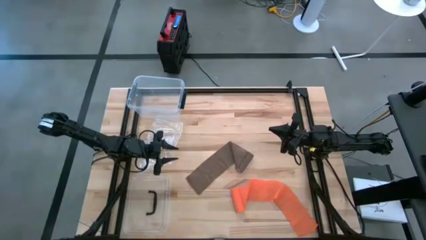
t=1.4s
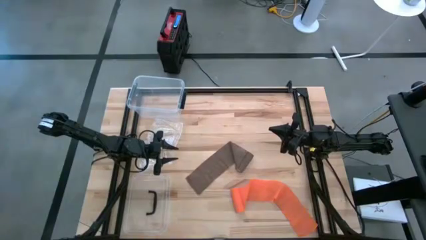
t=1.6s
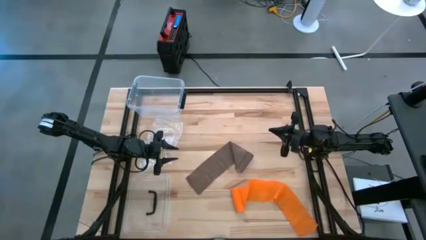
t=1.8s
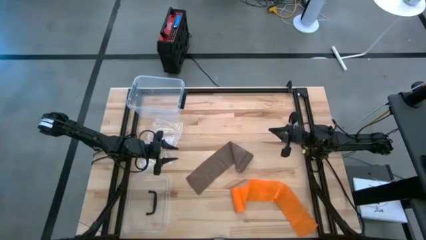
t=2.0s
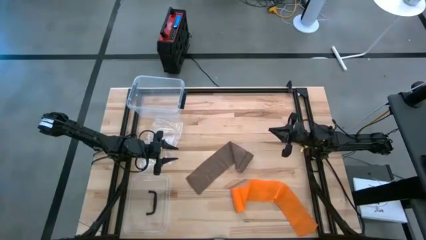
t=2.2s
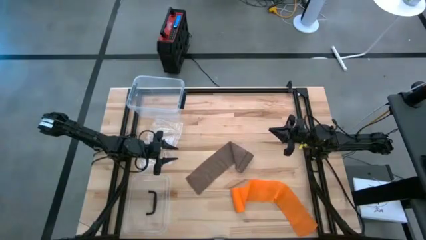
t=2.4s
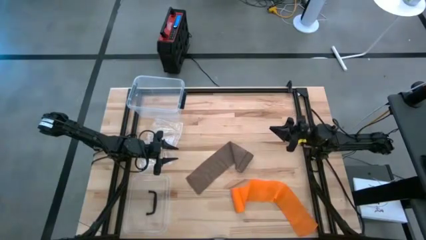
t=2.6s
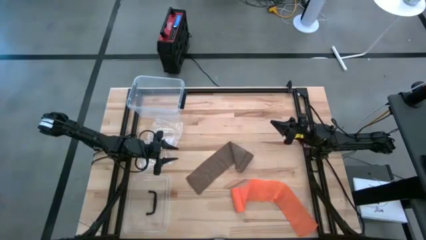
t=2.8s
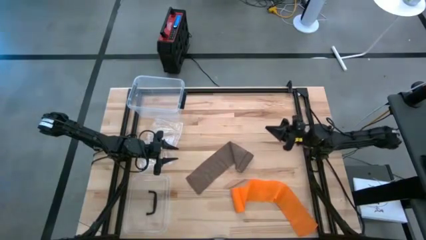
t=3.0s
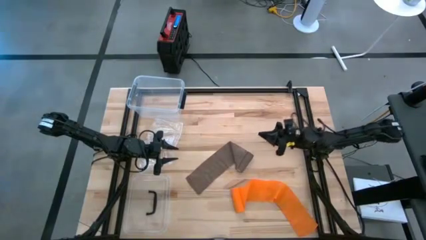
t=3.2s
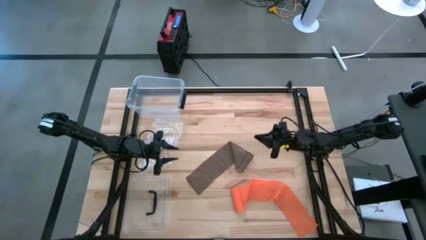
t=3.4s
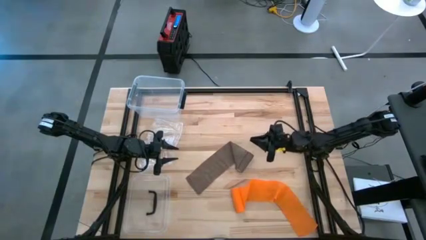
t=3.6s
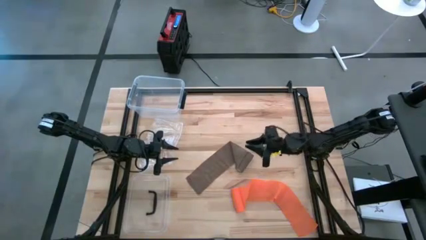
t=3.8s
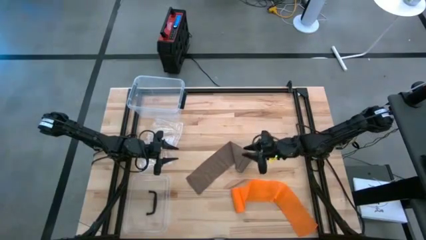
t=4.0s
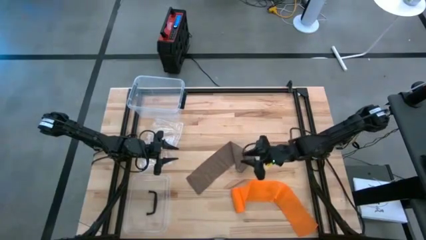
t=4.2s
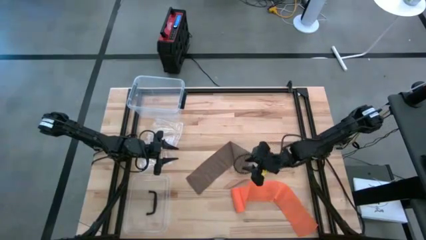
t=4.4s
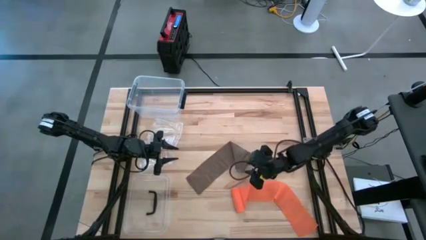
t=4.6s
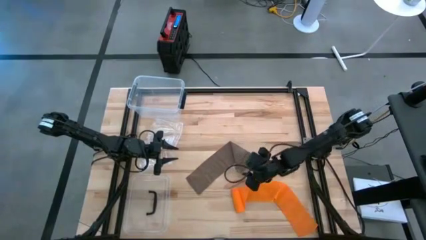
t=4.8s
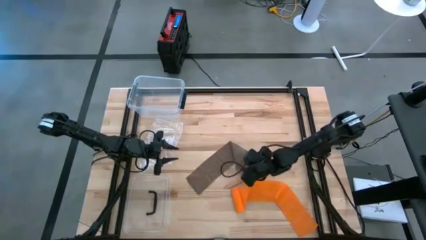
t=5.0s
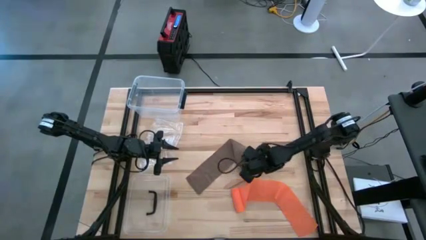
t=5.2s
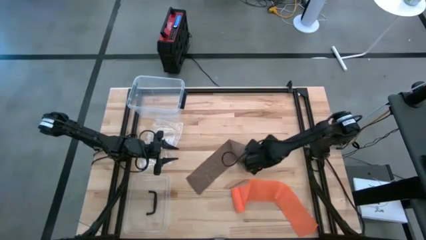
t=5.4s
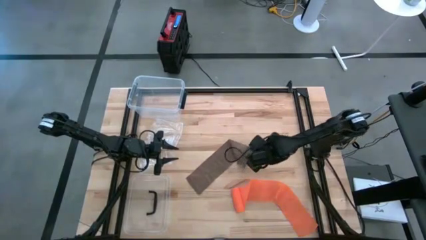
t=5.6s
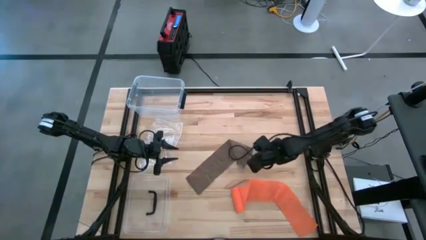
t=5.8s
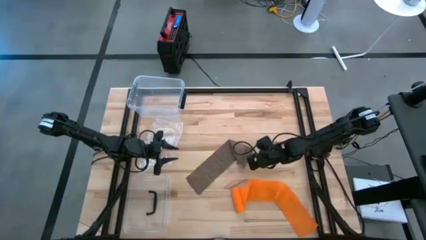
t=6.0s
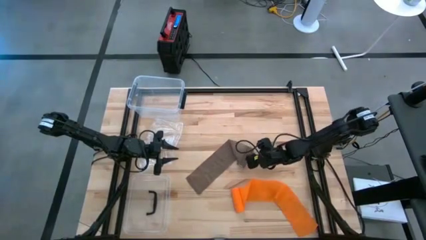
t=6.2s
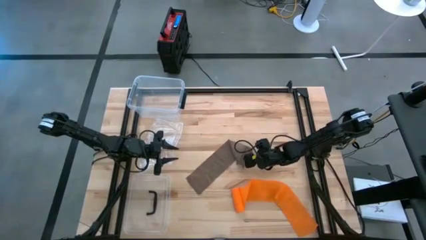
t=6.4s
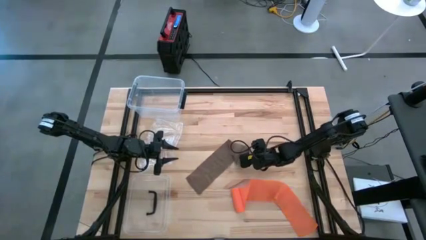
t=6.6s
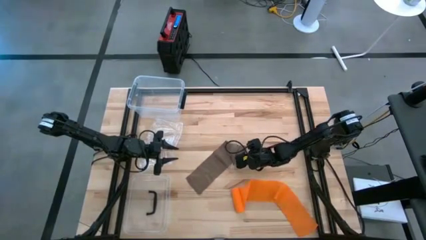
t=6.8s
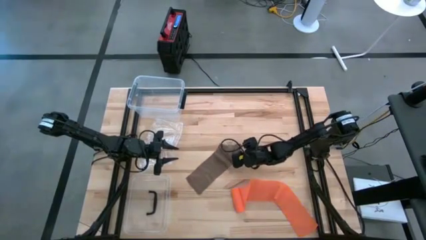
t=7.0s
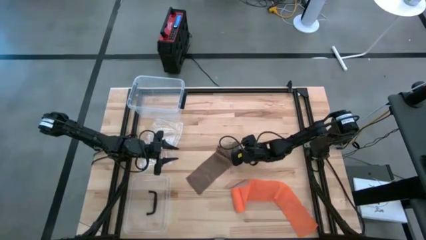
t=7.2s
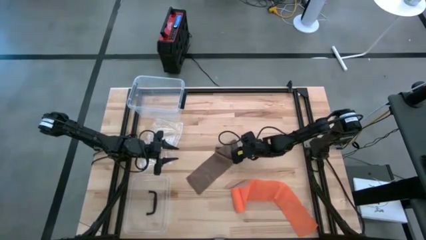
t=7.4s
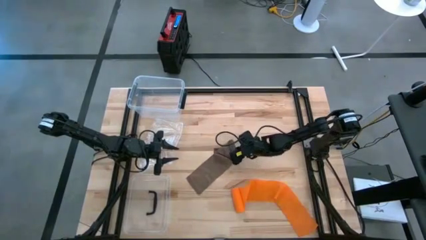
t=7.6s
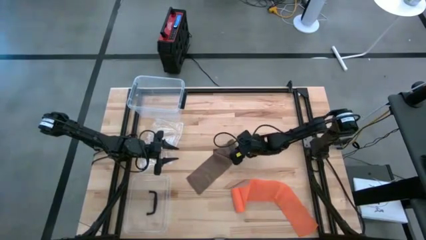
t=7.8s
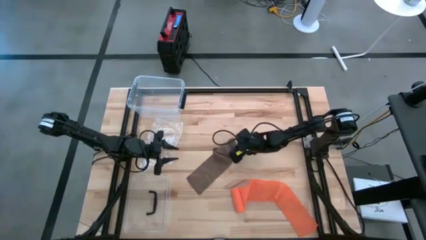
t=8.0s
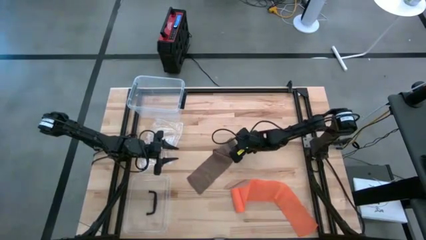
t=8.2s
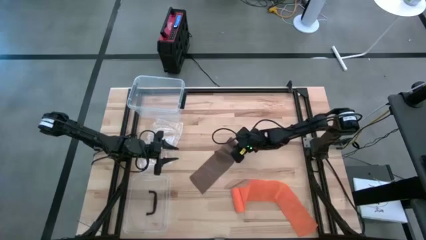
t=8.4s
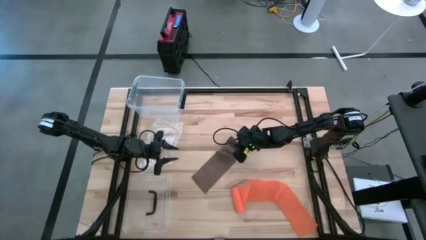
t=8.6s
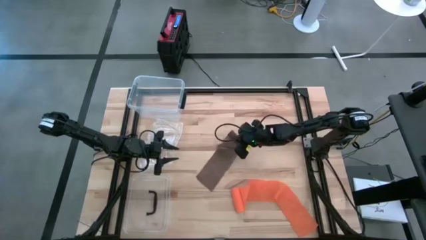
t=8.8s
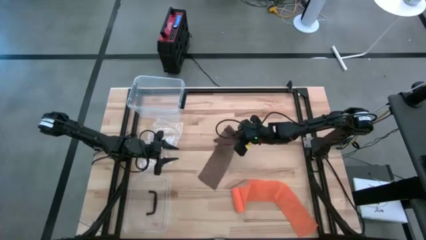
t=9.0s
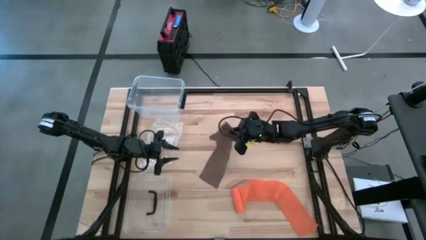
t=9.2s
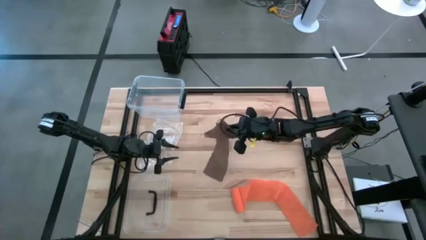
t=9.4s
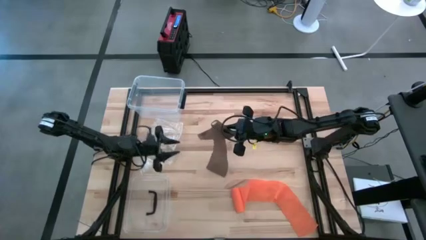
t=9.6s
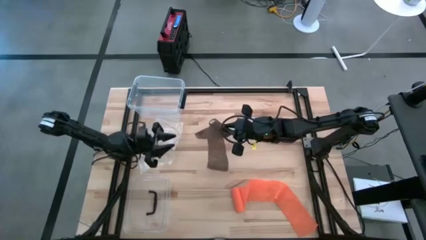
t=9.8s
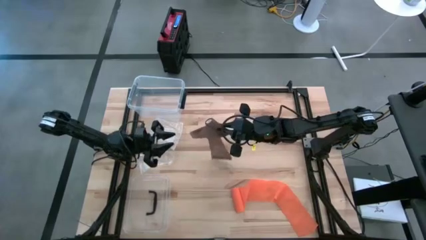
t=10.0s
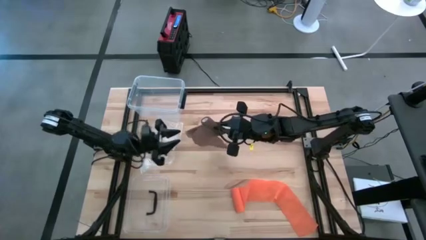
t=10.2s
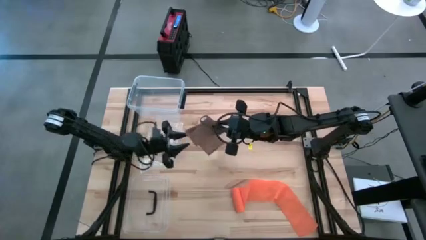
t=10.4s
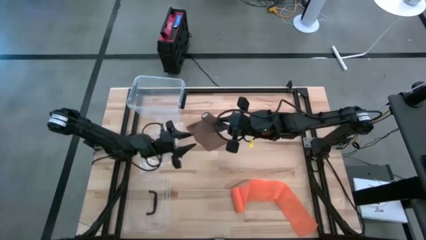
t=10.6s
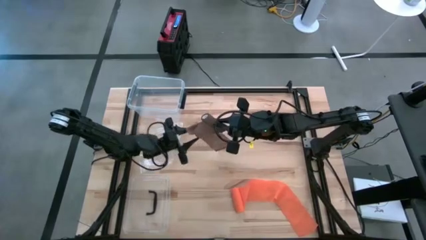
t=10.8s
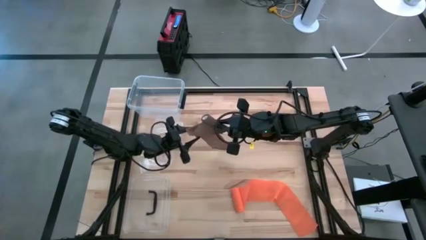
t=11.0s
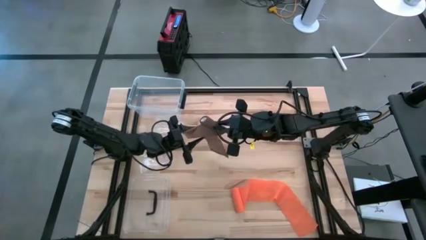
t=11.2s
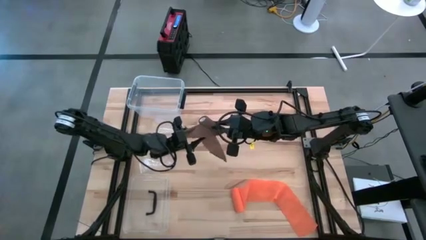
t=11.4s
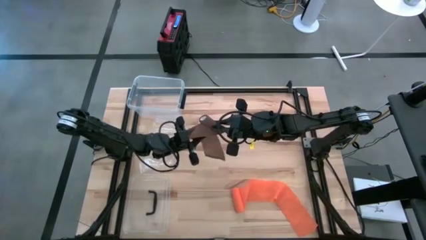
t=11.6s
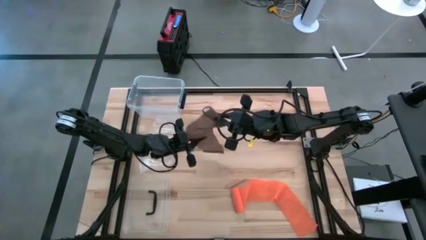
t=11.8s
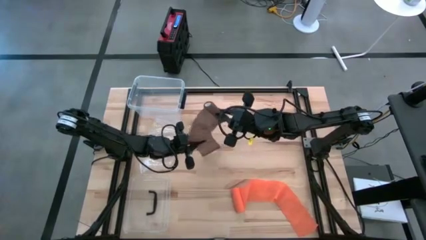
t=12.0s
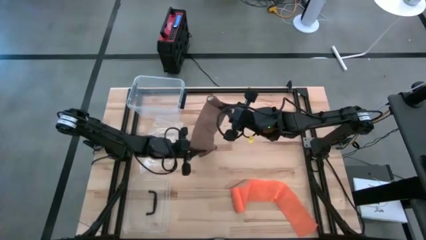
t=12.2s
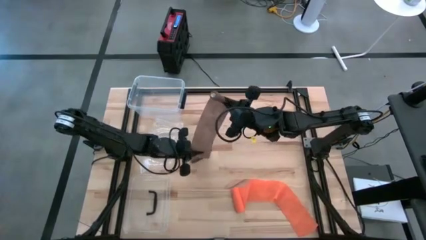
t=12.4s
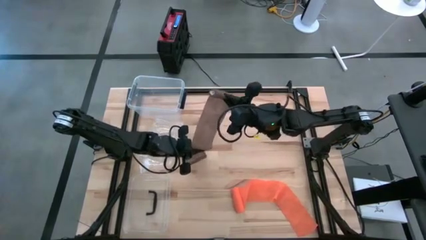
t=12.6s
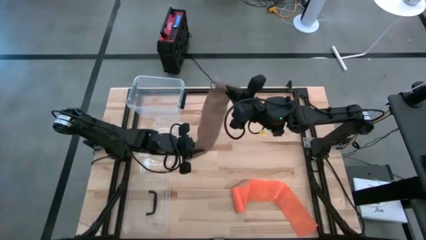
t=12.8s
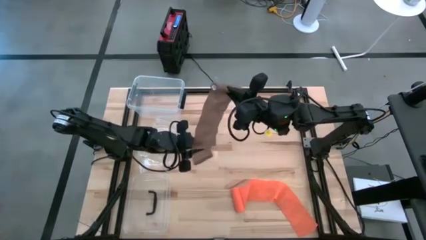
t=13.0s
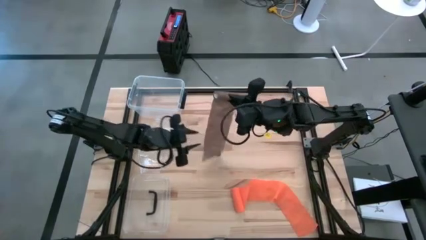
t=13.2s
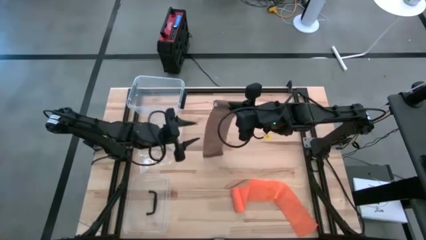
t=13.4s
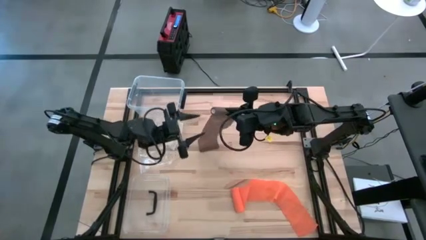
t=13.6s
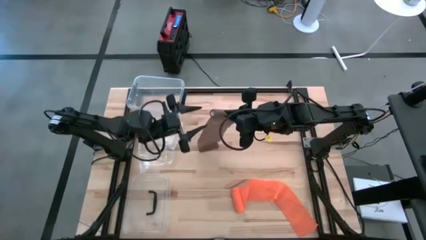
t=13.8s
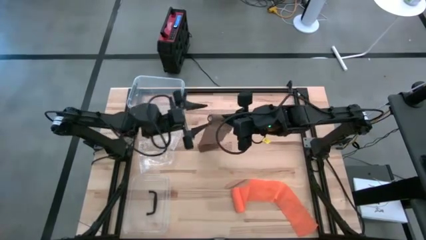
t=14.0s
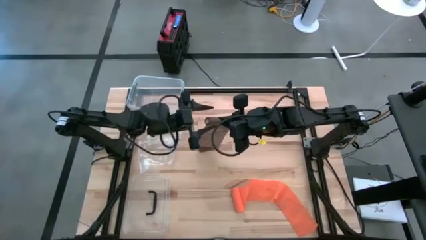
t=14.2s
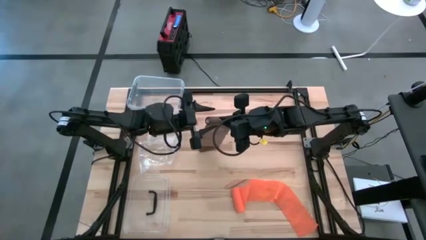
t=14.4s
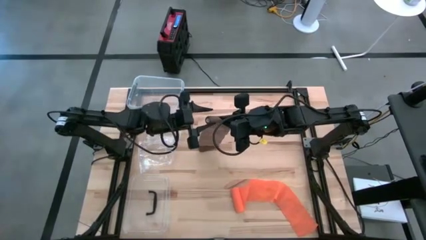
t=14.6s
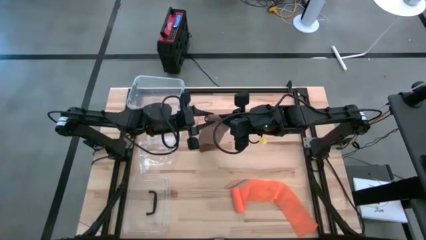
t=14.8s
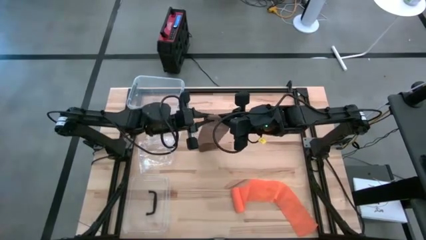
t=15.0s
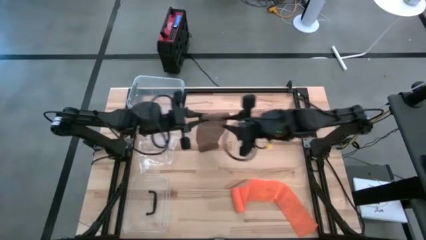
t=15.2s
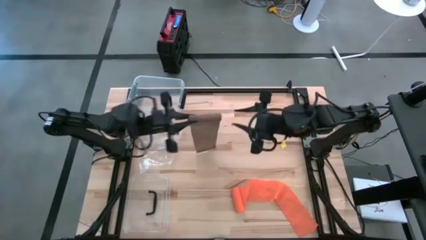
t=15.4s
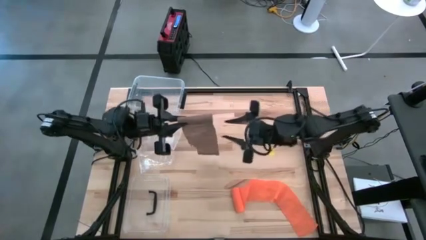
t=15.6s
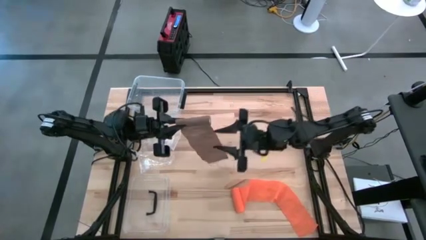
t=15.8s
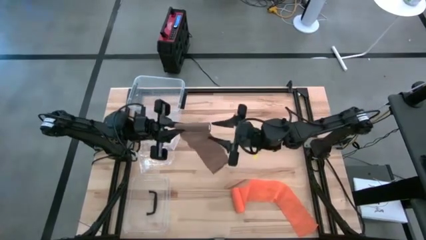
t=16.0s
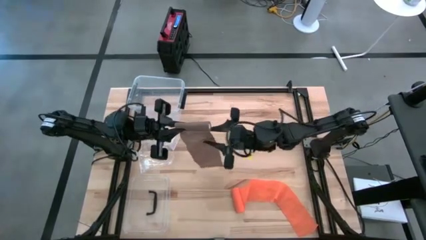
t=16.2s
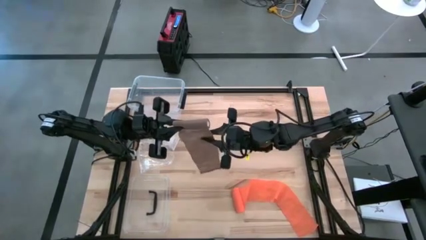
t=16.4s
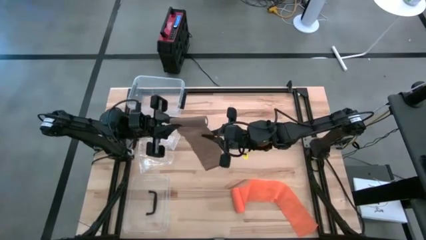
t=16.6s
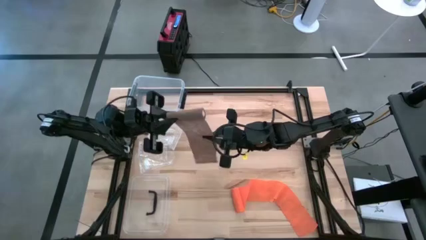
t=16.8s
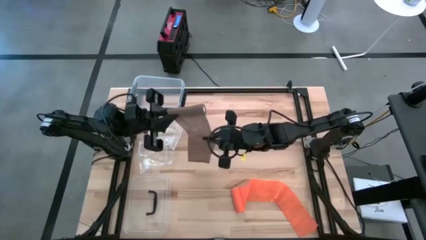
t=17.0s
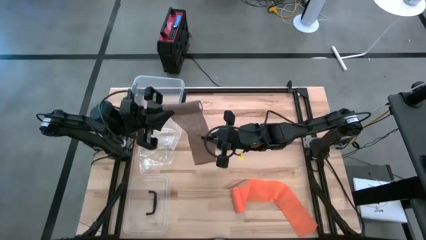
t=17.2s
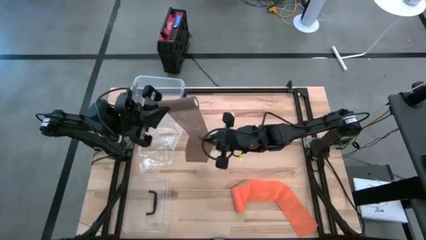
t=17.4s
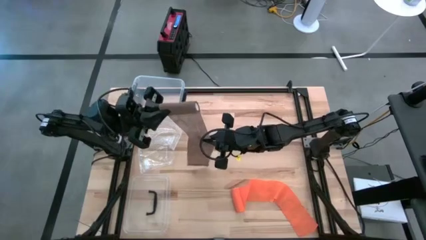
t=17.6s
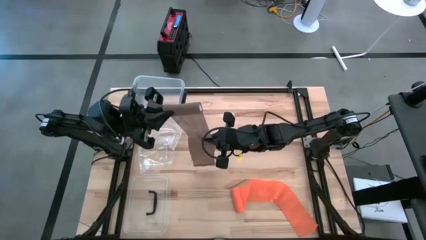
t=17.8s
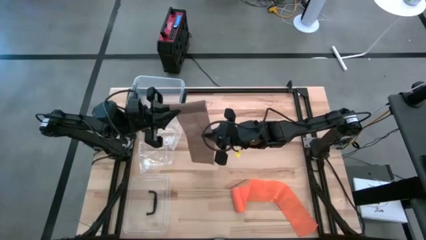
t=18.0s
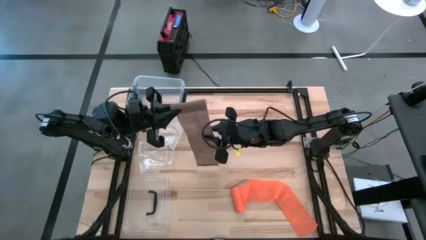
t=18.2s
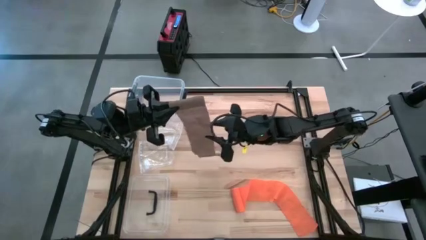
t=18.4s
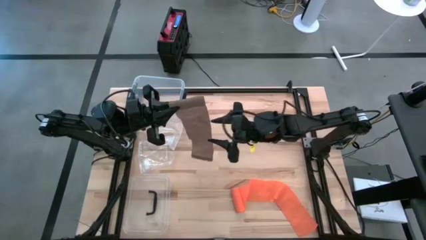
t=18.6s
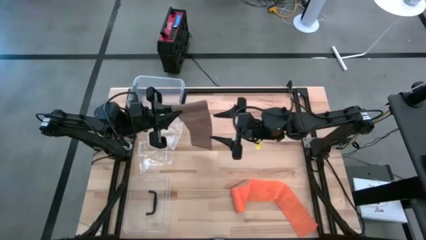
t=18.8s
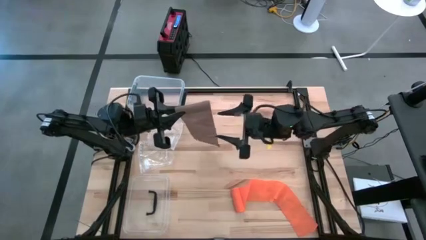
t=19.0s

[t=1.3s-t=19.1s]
Task: Roll bandage
Roll the brown bandage
